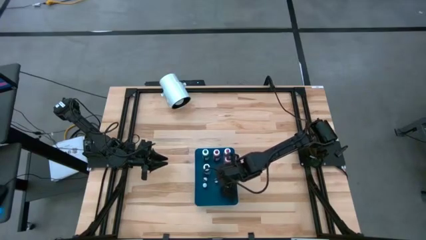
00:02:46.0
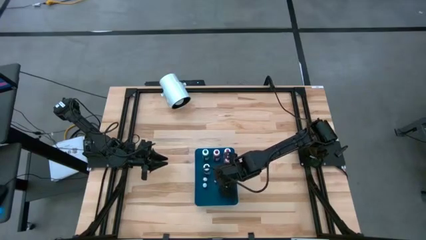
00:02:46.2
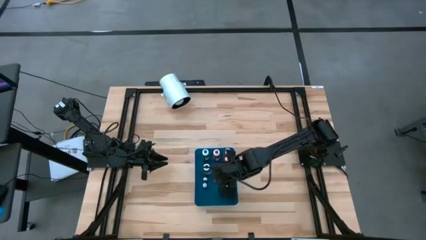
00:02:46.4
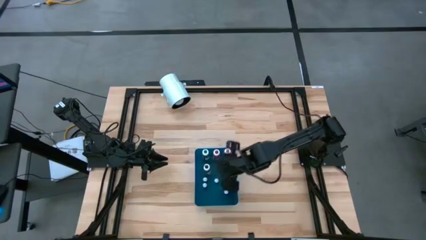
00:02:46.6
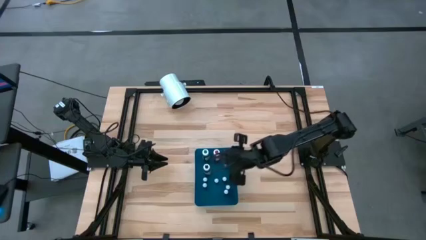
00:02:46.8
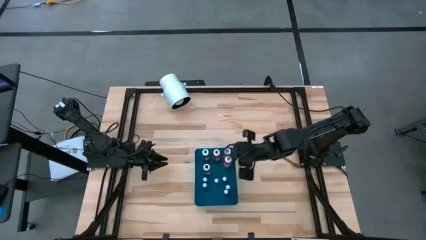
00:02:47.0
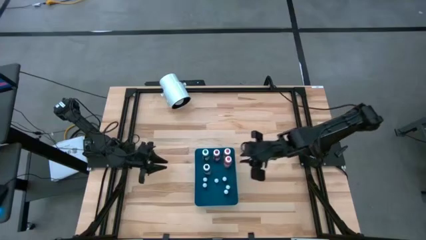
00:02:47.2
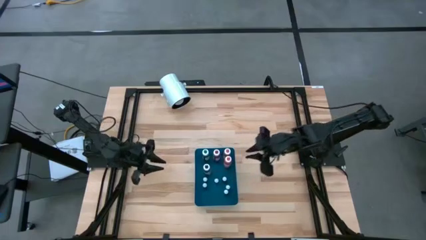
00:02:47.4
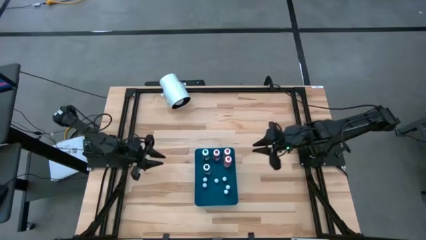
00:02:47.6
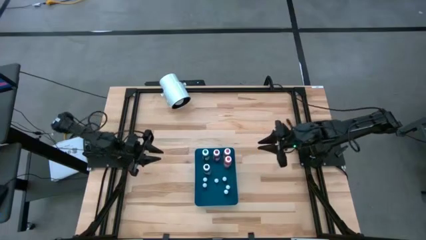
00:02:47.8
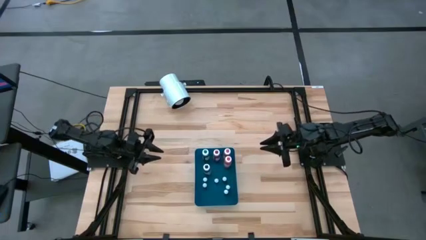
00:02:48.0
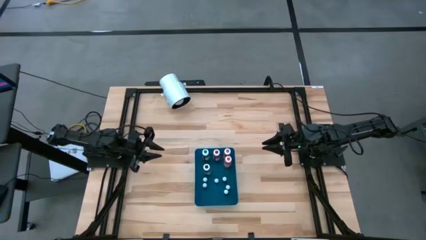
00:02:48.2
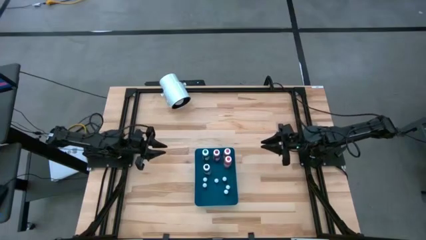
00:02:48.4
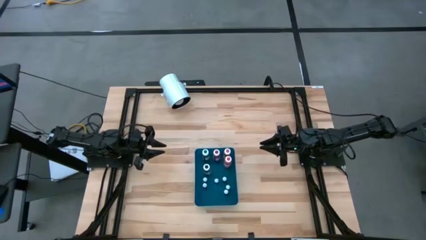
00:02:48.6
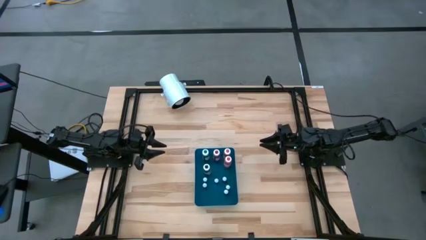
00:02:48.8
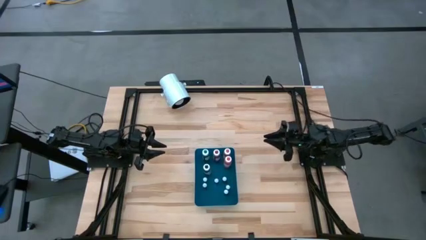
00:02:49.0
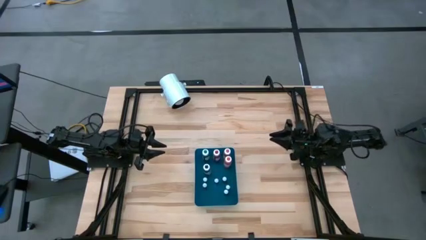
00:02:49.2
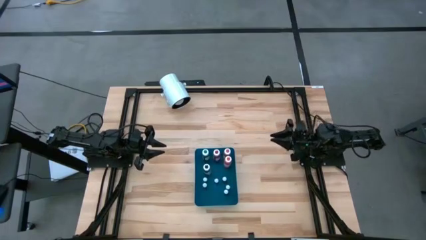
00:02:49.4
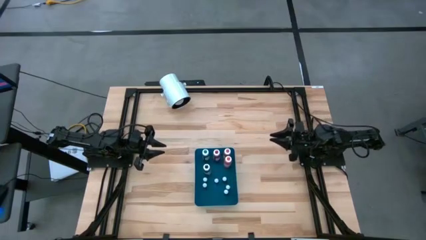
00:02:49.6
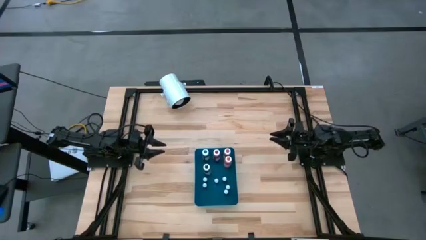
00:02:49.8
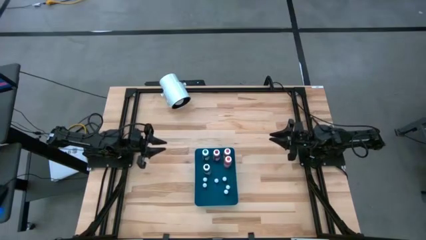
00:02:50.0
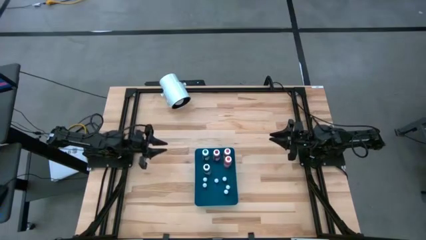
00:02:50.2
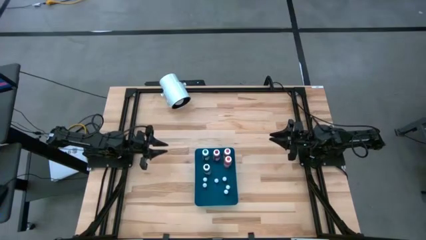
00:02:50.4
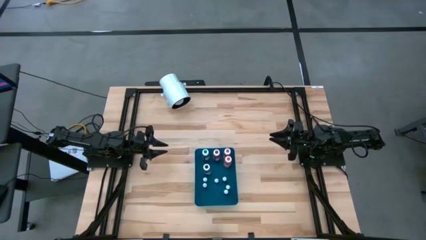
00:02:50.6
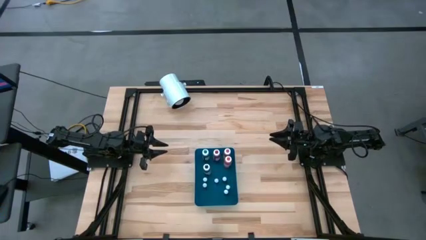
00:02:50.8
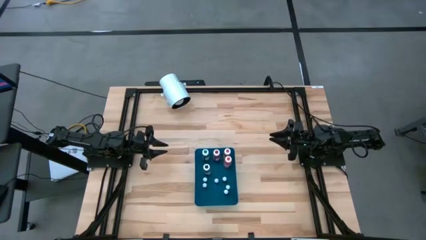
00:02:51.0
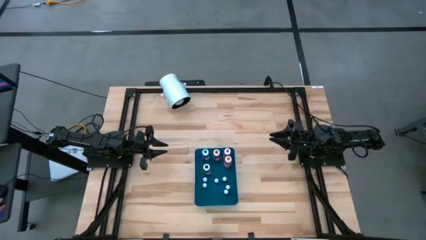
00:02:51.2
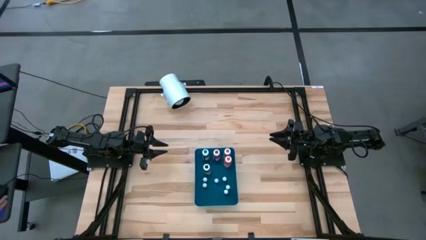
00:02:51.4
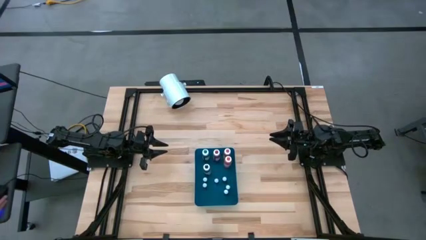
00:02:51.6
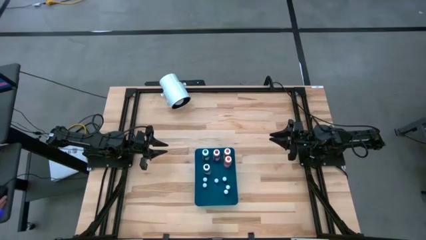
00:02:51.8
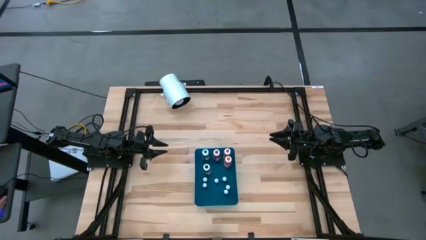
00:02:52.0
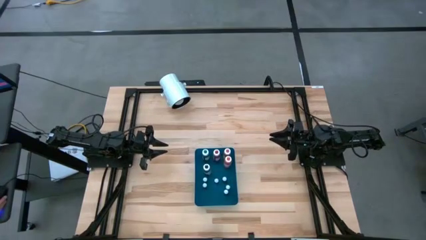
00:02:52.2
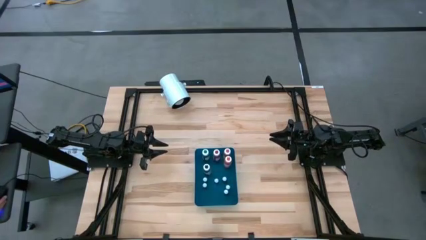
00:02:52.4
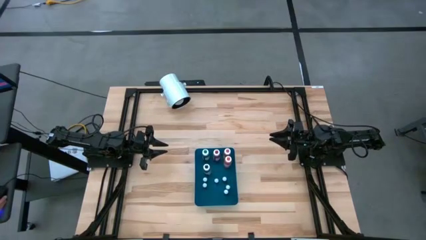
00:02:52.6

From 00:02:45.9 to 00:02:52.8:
Task: Pick & Place food coloring
Return to Home Position

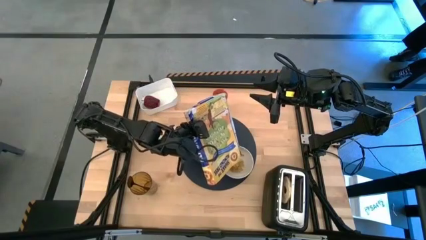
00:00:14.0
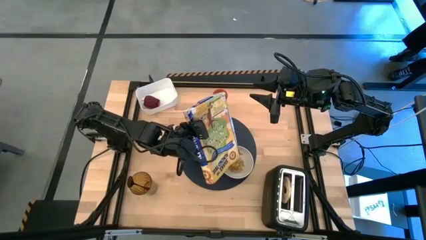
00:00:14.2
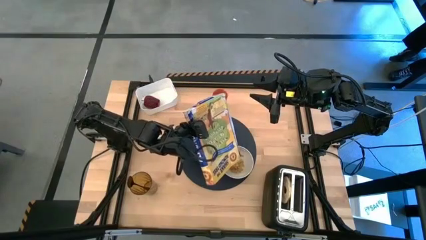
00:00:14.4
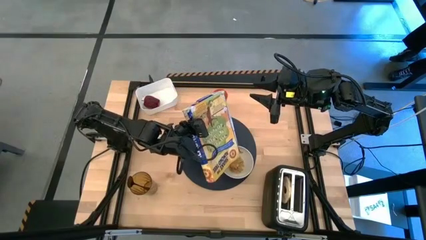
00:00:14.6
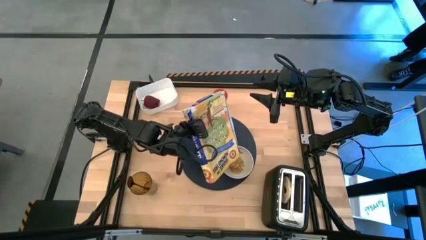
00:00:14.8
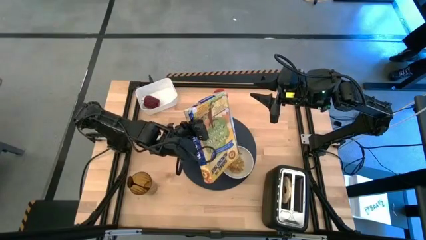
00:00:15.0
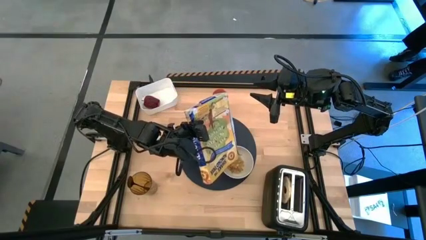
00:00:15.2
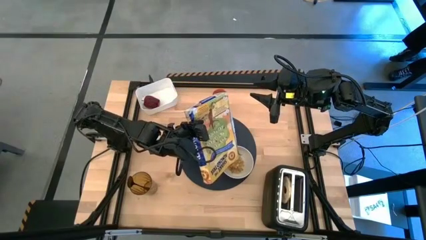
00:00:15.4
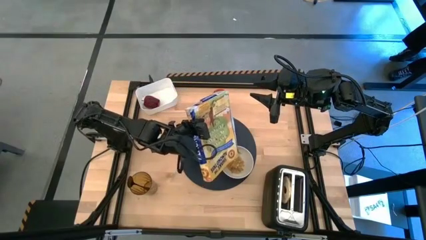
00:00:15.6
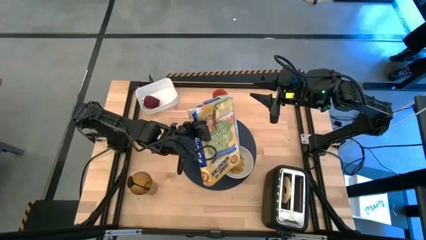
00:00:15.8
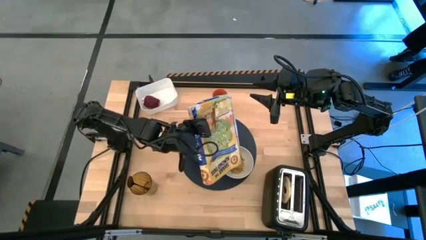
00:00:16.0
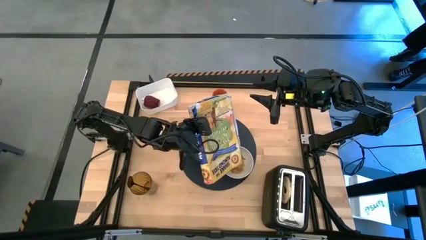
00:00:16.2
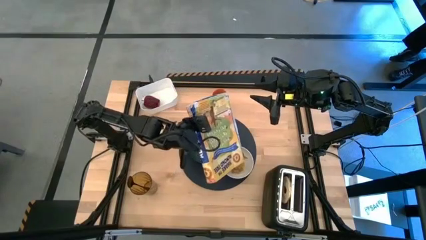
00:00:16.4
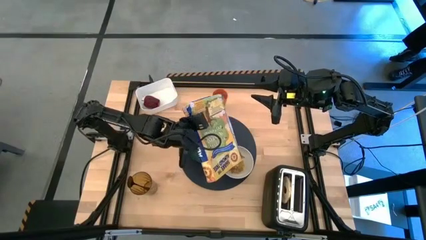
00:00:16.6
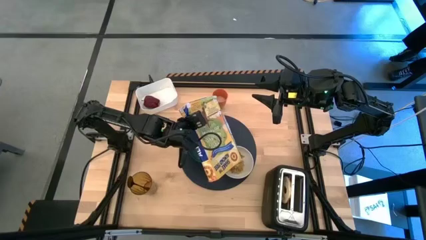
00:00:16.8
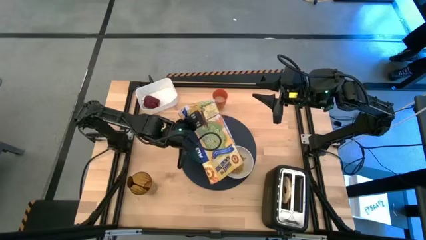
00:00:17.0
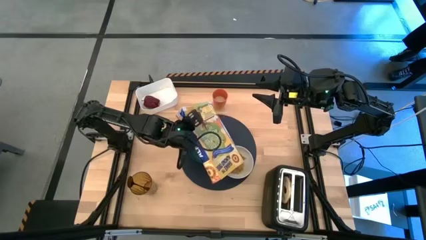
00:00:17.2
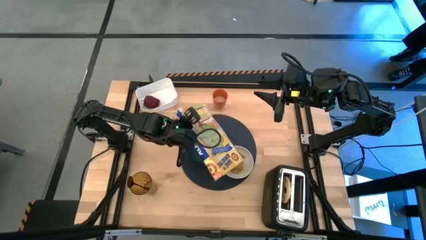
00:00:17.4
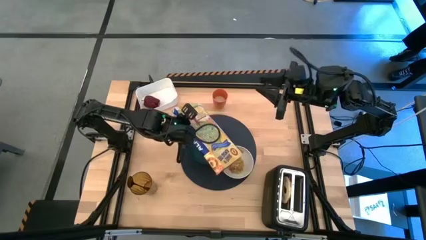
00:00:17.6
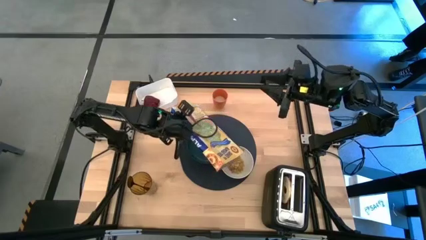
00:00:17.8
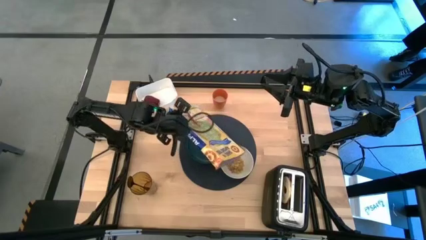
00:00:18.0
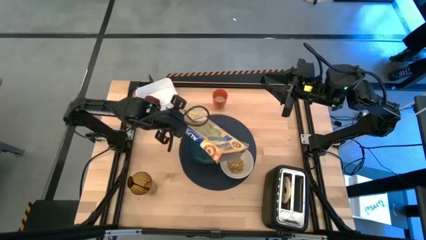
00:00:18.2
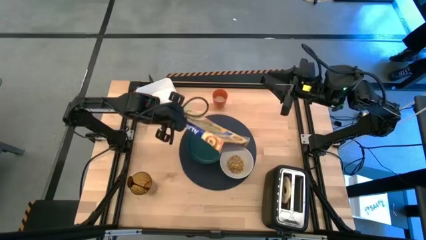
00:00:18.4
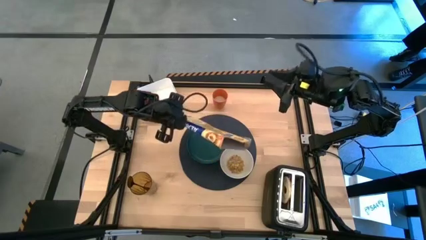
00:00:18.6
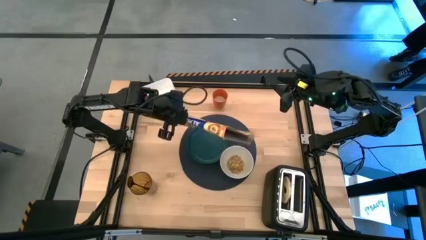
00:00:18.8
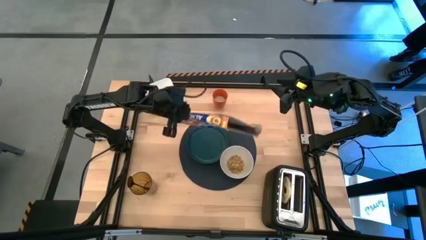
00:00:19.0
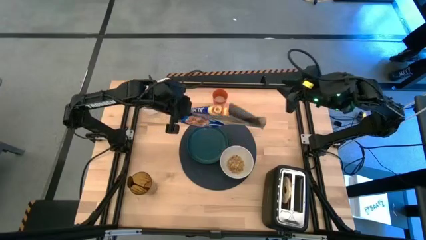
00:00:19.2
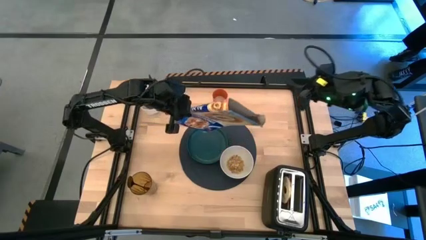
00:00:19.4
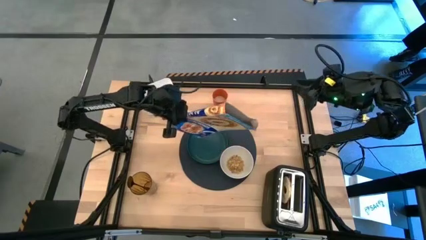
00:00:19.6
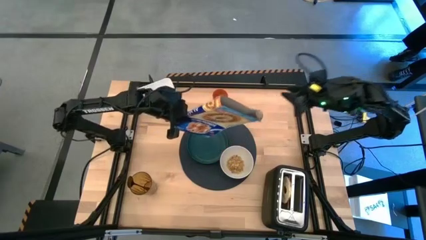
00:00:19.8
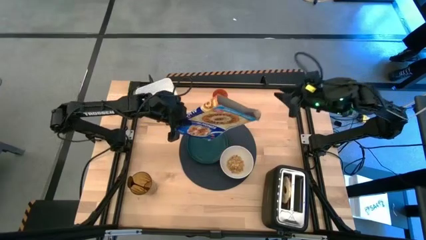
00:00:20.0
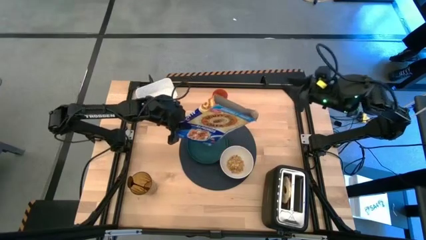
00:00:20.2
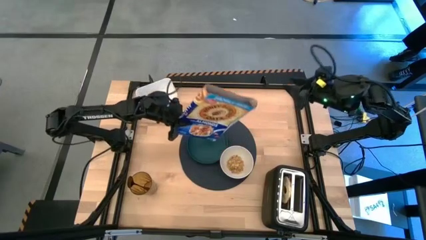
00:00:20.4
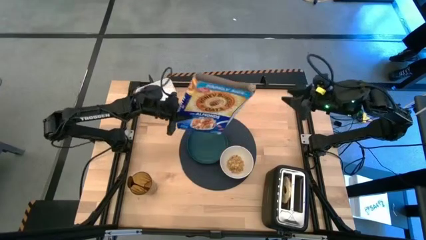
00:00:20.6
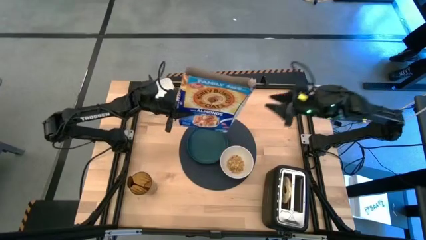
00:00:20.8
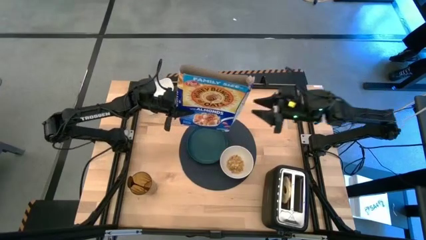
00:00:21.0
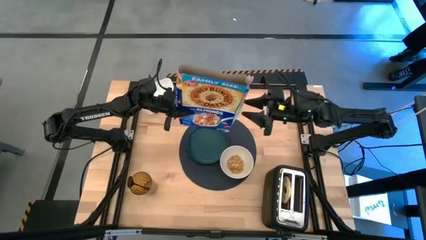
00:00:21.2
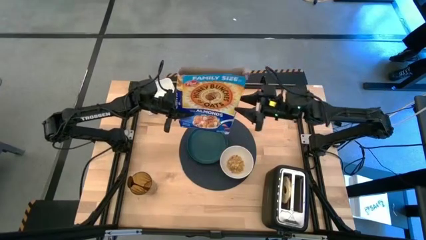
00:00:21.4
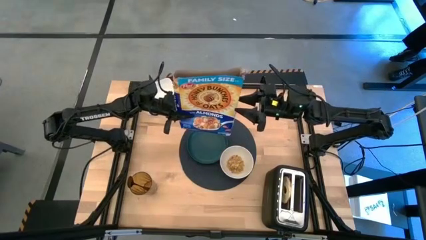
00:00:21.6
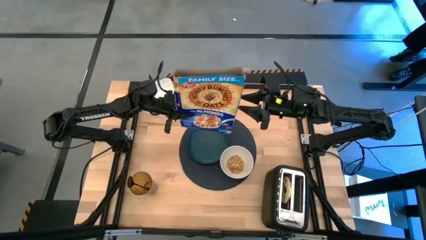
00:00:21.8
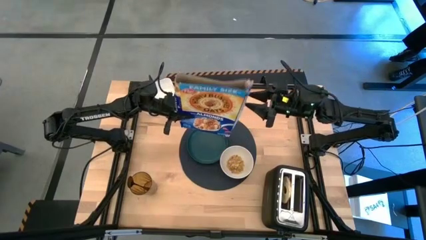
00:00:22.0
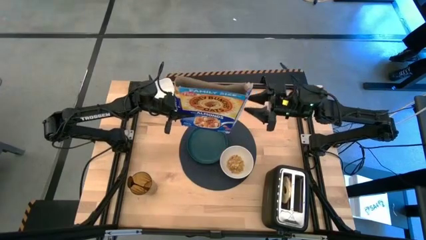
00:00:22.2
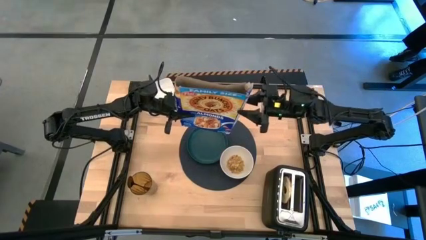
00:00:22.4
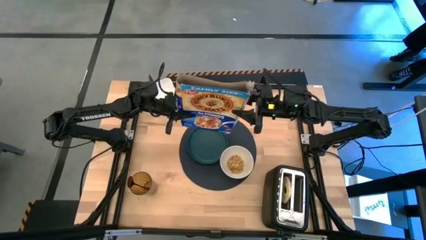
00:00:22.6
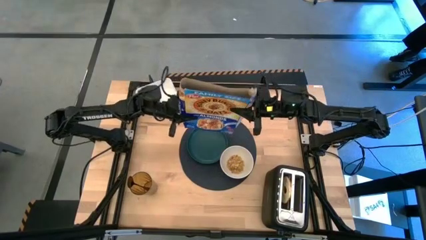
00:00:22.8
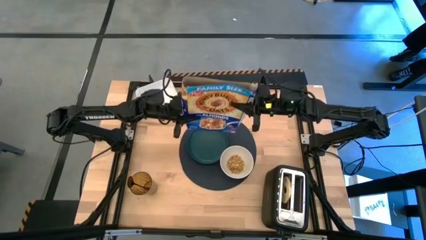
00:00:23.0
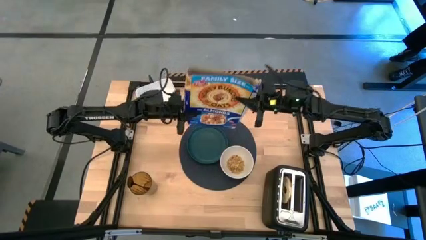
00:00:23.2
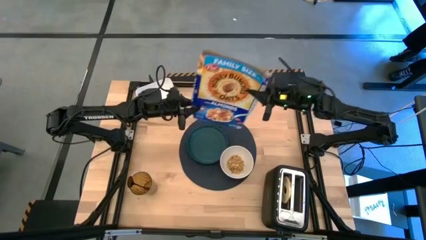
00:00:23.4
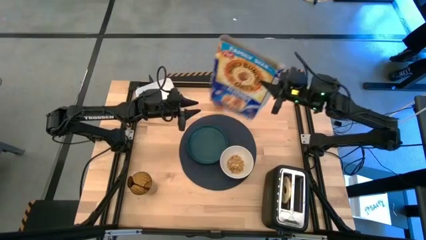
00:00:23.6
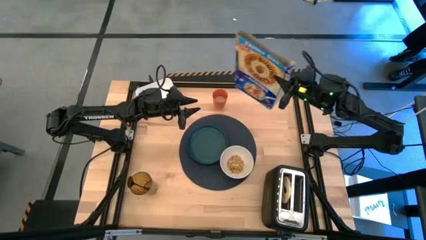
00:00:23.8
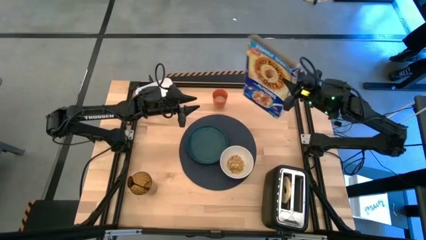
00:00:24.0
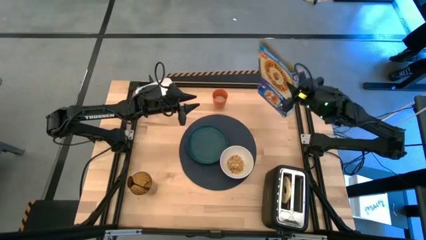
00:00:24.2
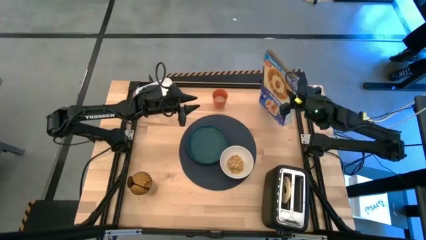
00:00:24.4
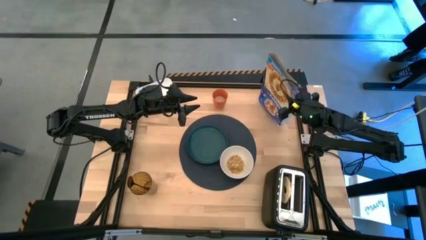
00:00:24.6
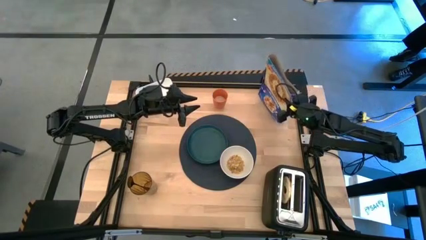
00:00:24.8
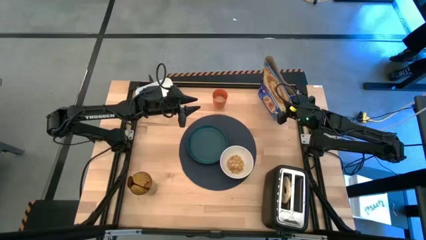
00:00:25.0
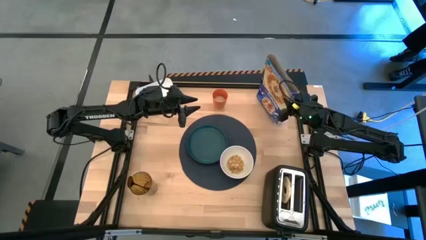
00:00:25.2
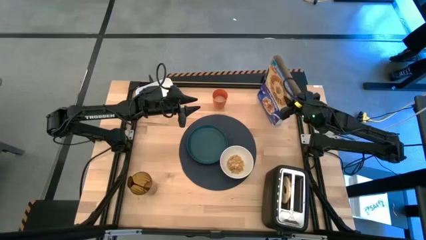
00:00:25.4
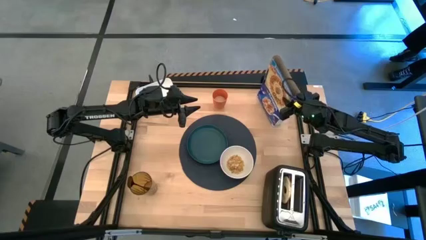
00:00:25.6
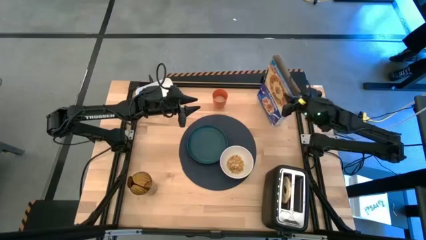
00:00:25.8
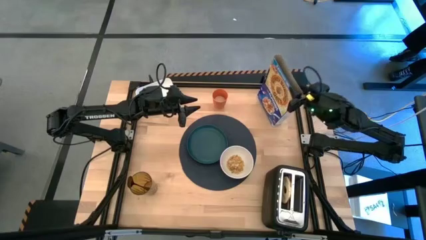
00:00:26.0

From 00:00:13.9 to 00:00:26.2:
Task: Arrange a breakfast setting
Pour the cereal from the cereal box into the white bowl
